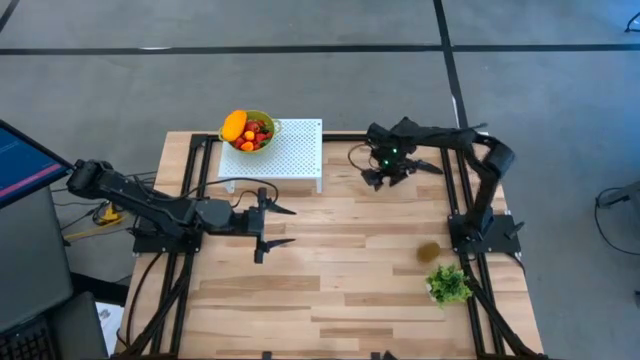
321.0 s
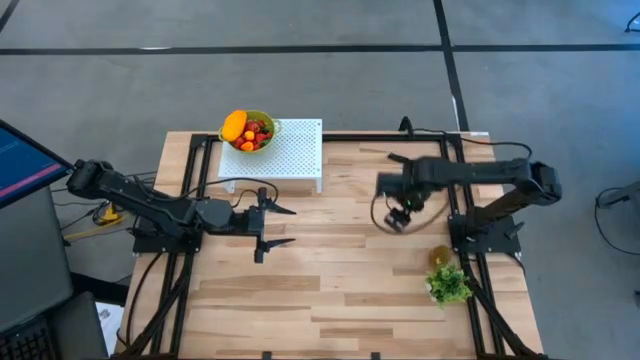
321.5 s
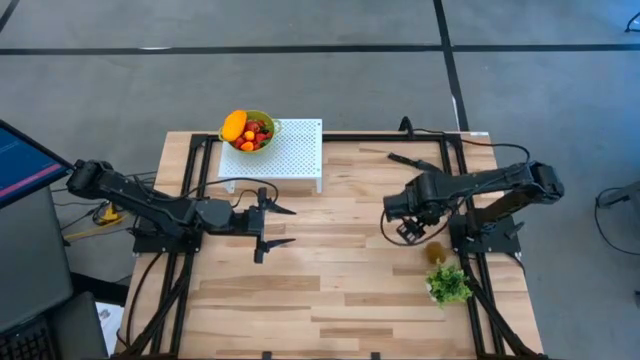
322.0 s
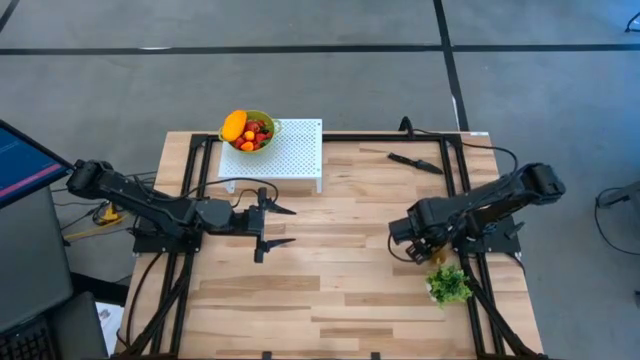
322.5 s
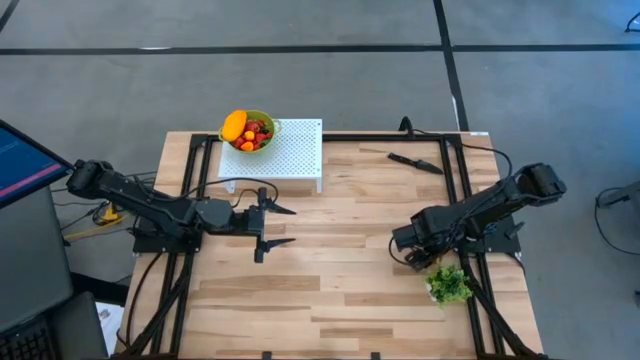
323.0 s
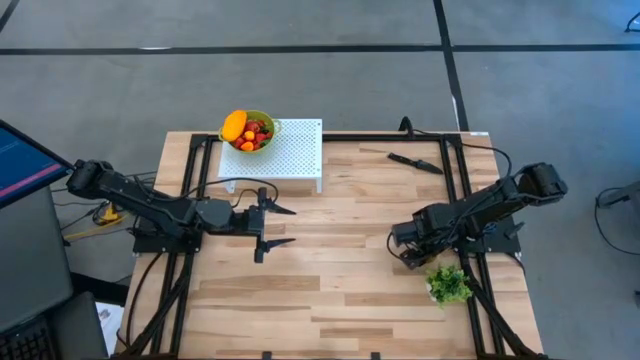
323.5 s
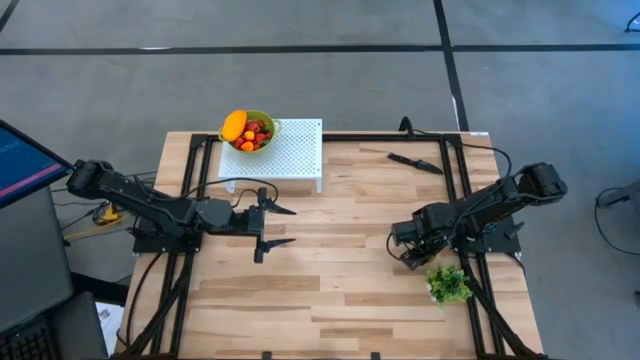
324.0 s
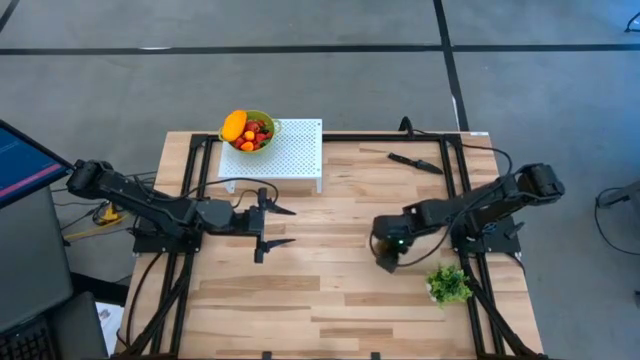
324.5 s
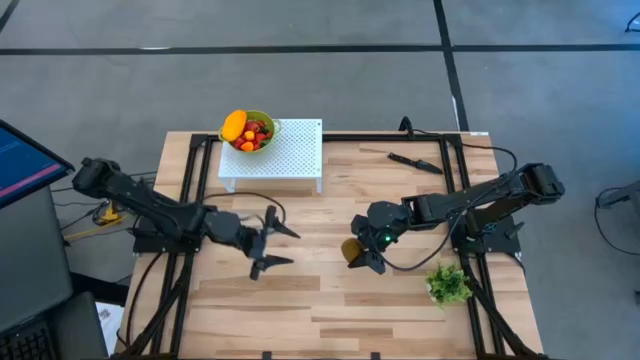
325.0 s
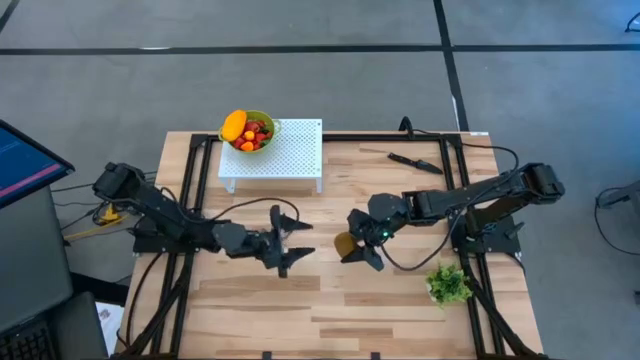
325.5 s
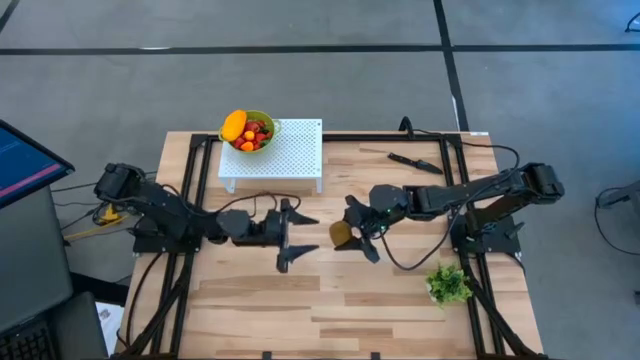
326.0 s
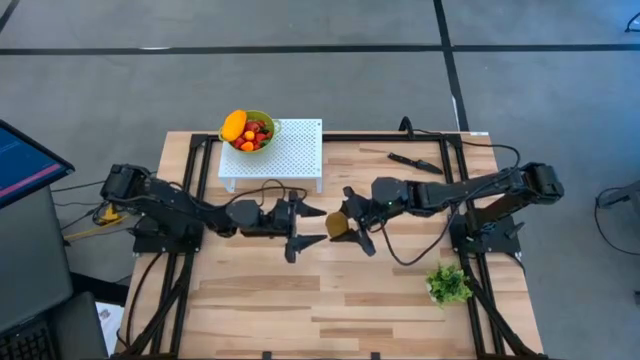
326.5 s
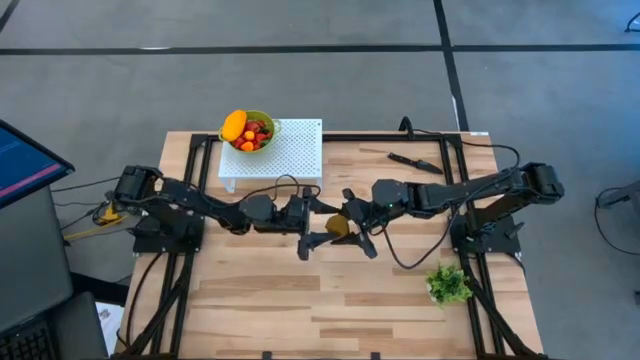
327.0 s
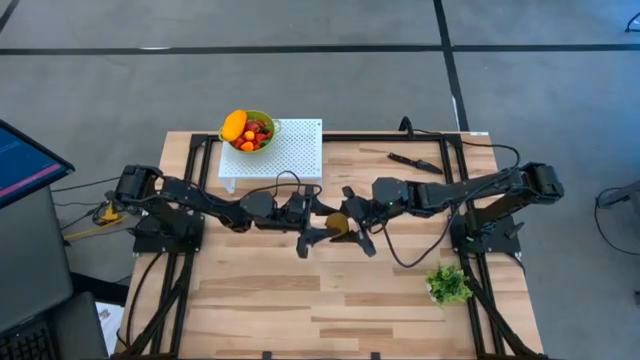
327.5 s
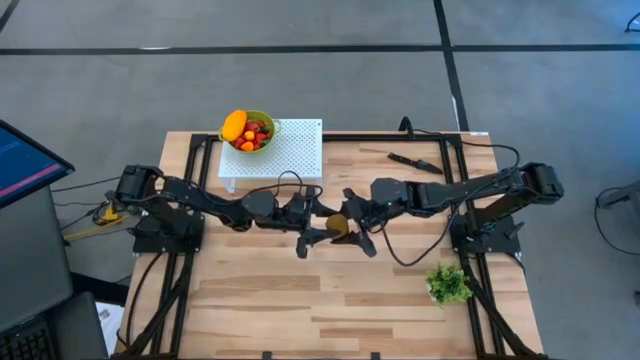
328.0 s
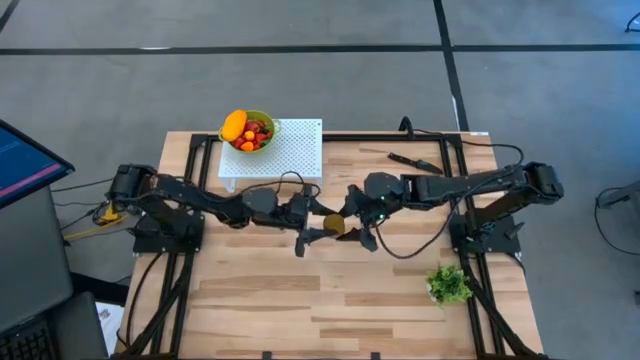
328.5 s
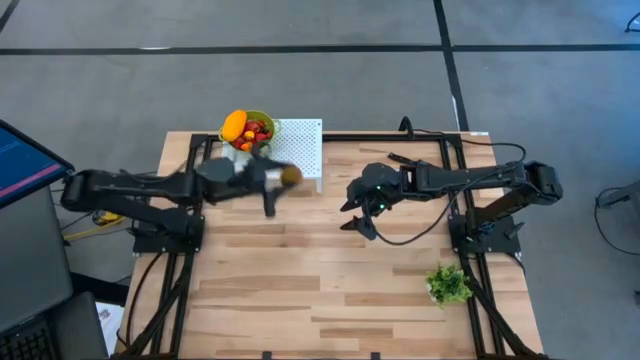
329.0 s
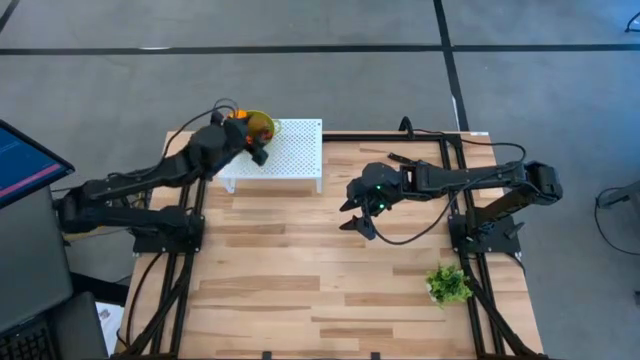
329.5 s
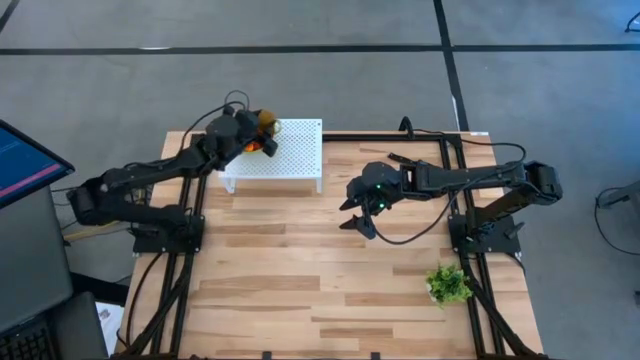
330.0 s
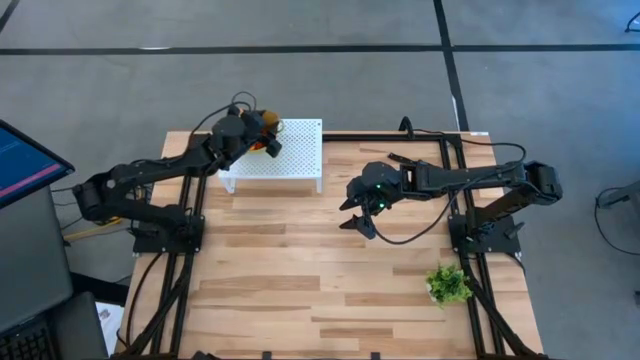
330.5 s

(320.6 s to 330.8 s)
Task: Pick & Place Fruit
Put the kiwi into the green strainer bowl on the shelf

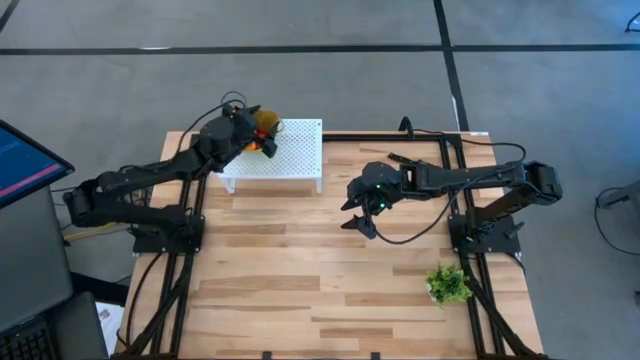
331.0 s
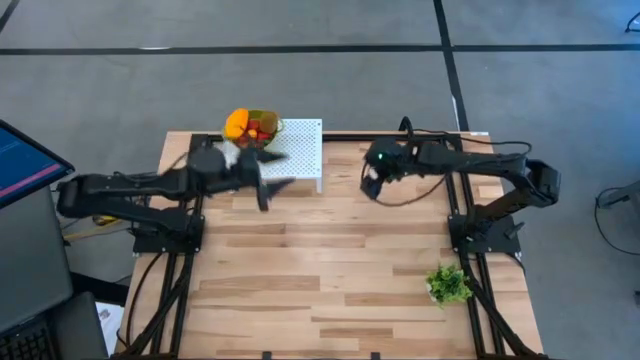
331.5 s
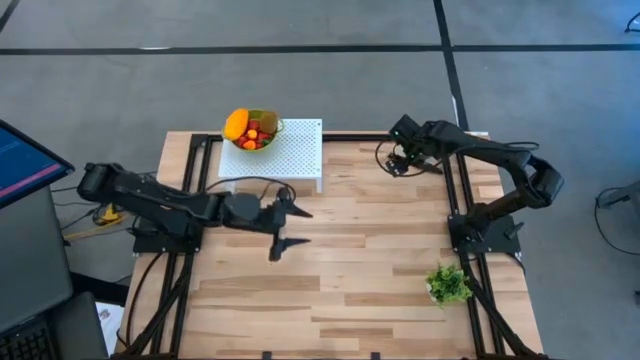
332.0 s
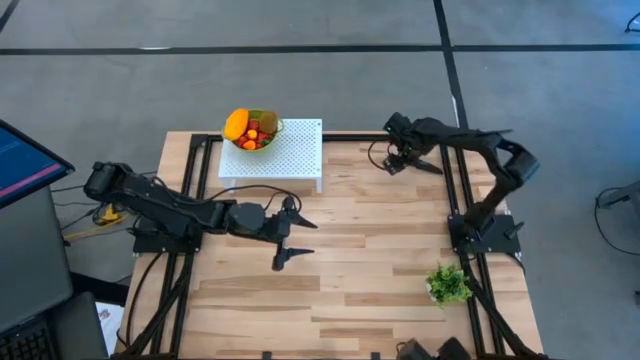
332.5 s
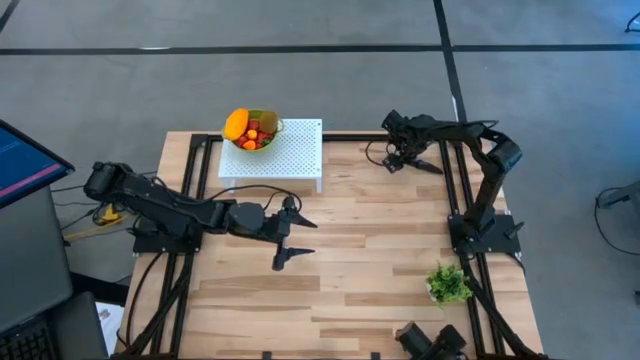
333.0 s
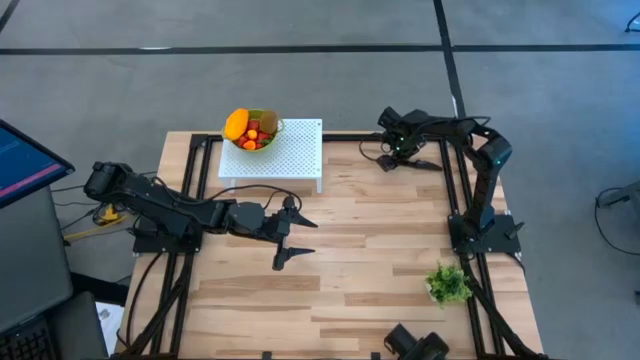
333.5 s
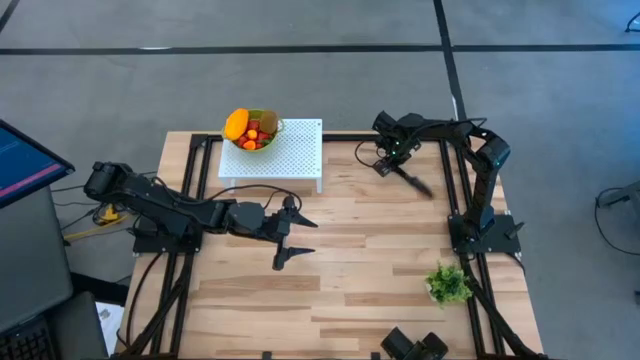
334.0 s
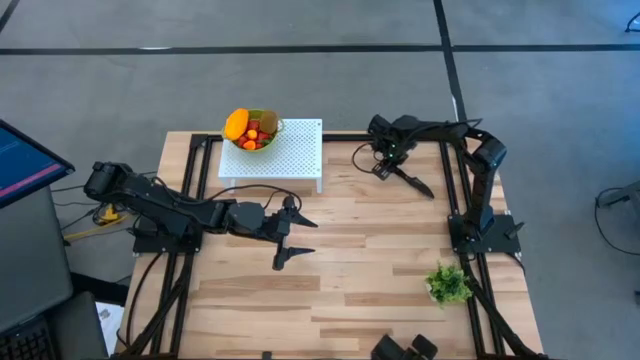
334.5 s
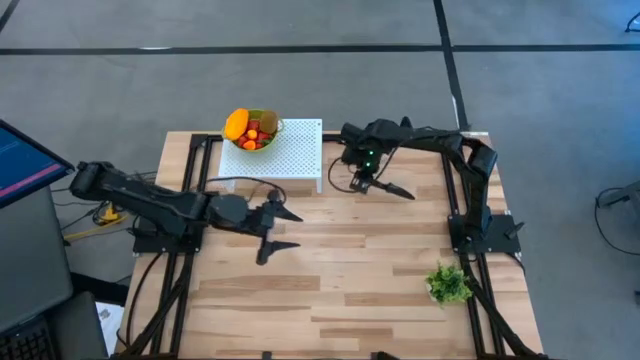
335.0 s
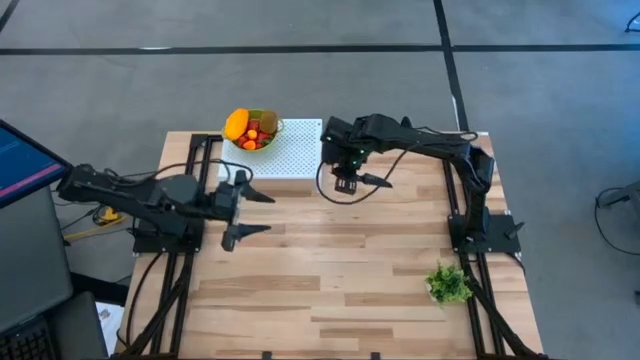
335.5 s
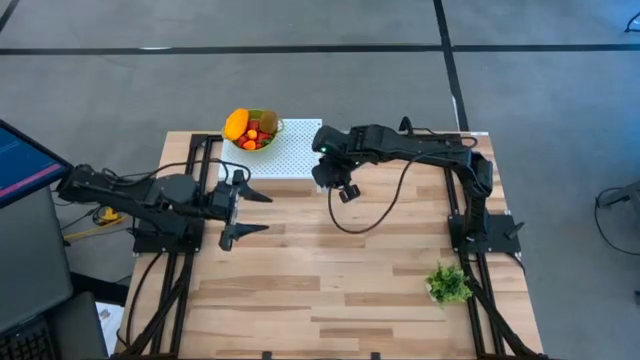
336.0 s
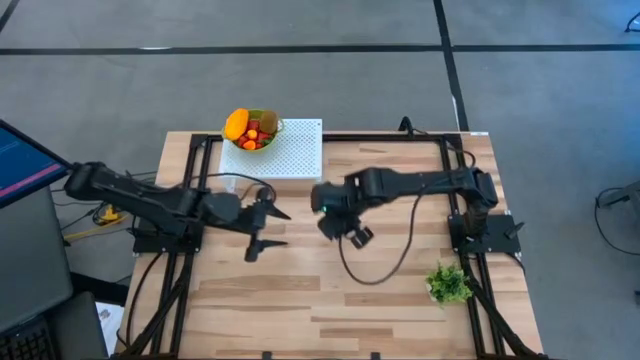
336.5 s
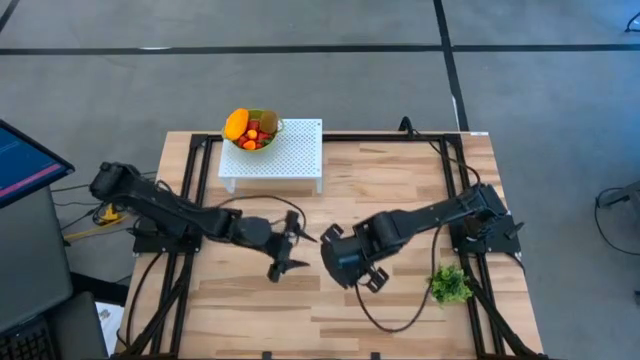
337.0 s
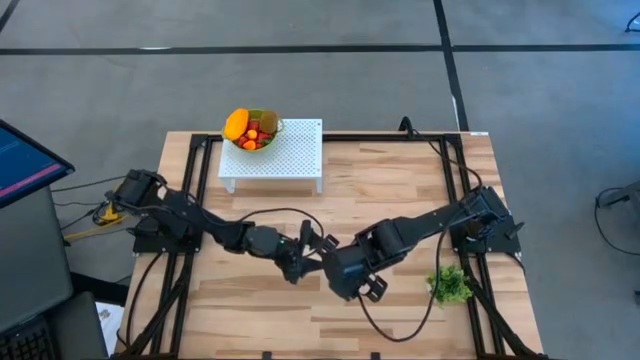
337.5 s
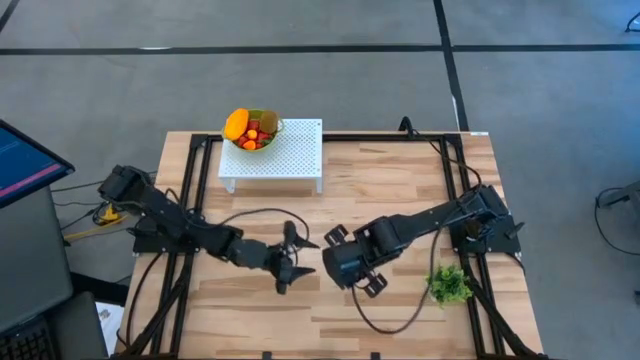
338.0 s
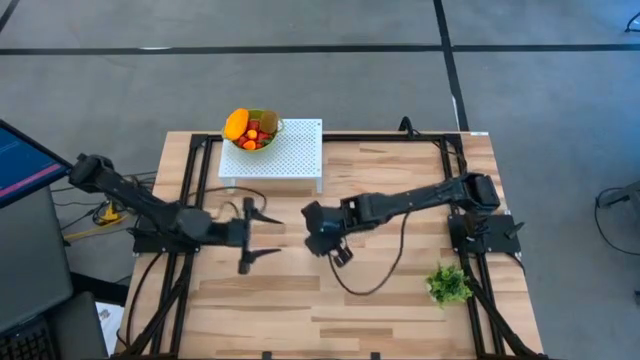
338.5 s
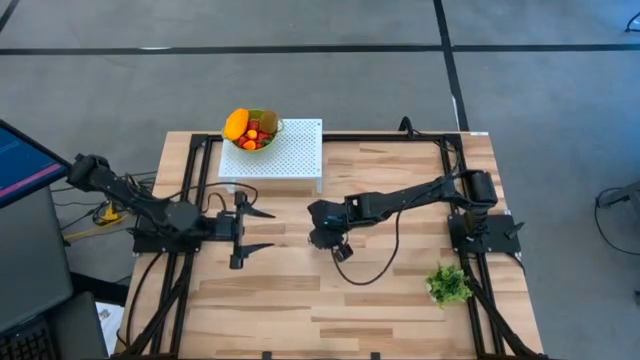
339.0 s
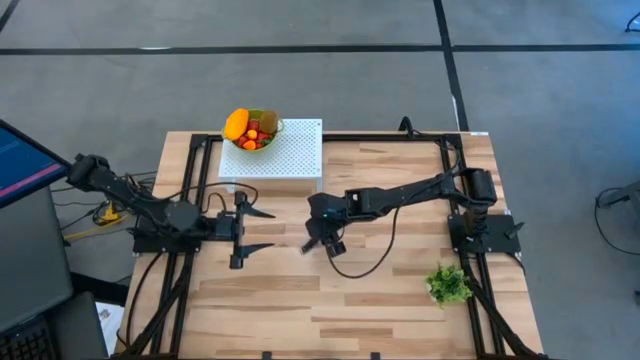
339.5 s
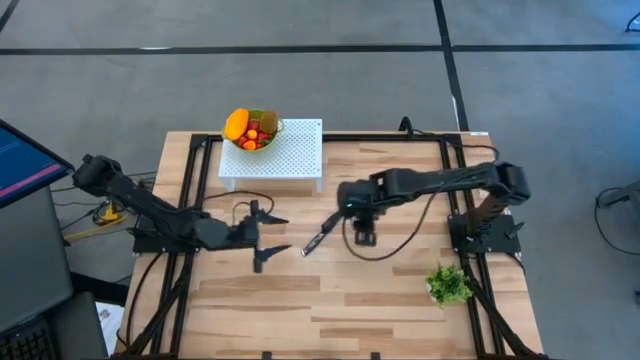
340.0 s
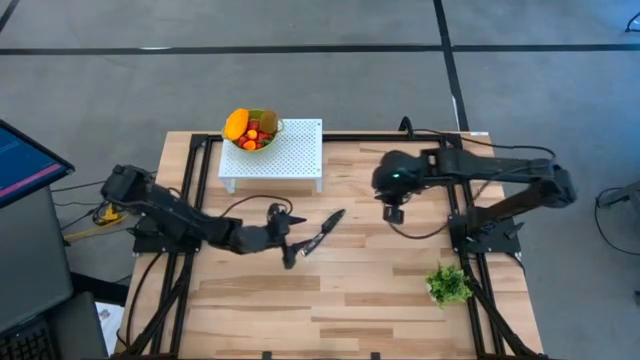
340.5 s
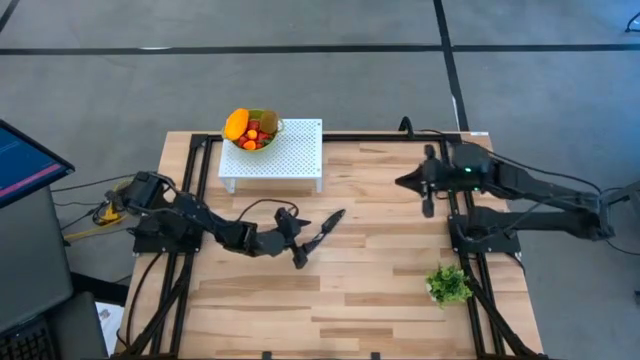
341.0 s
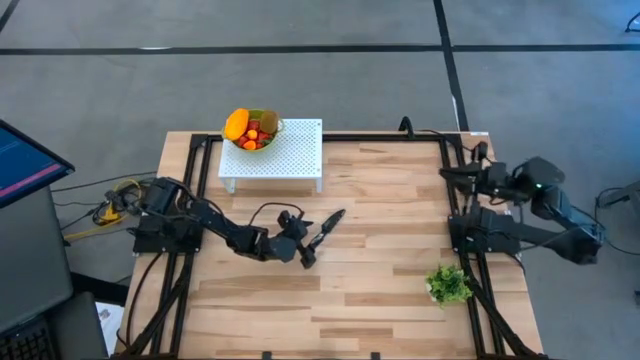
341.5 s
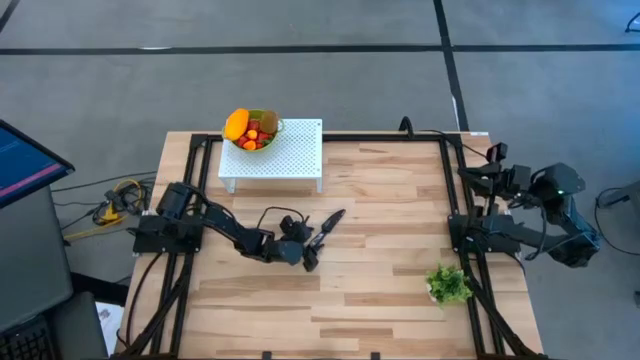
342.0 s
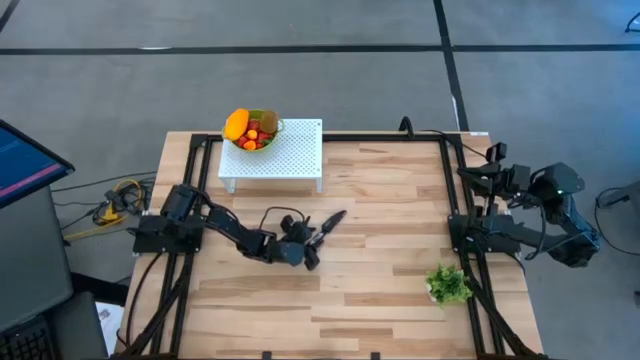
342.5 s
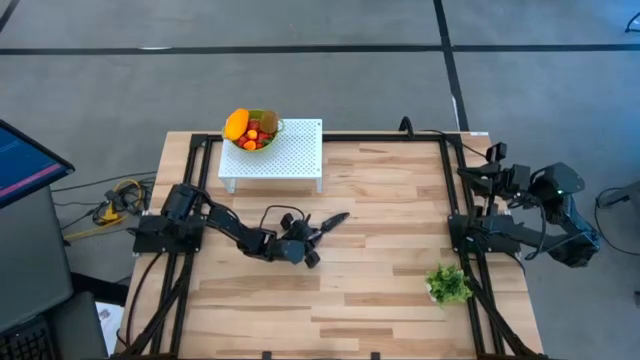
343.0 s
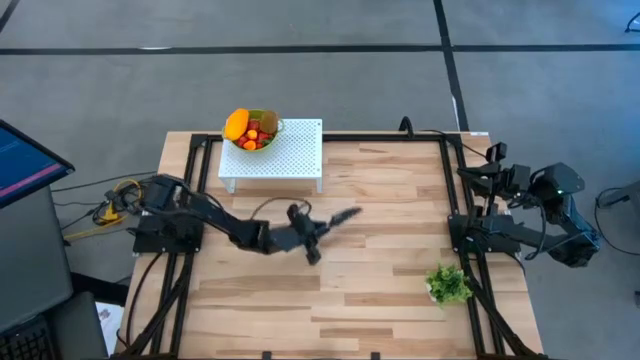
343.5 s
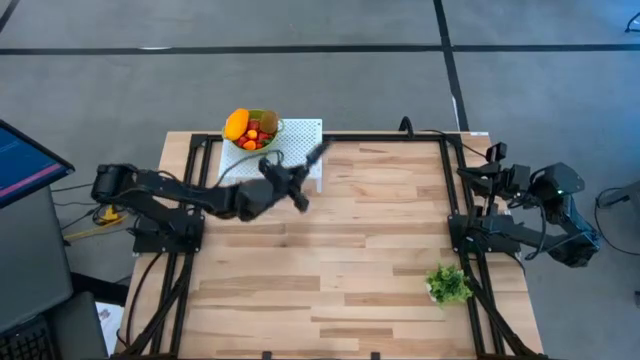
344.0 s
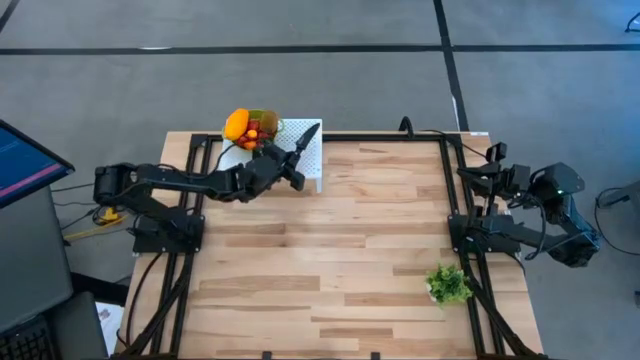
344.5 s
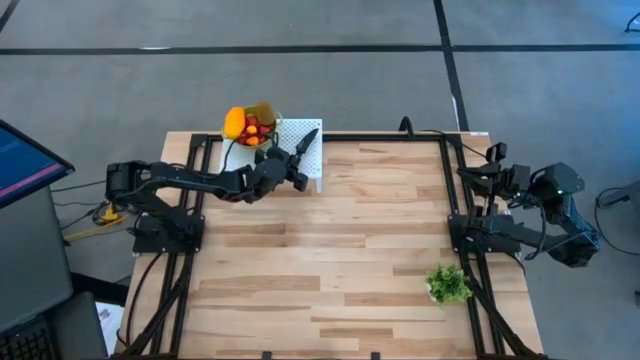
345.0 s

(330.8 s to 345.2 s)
Put the knife on the shelf
